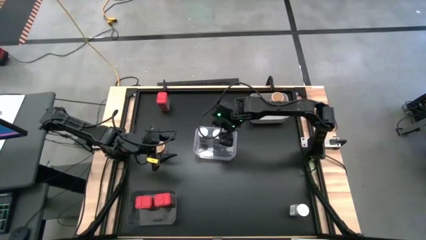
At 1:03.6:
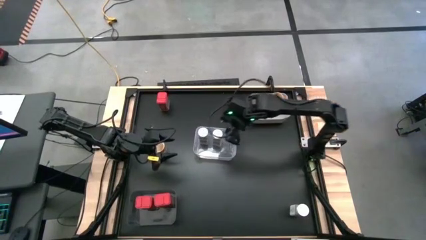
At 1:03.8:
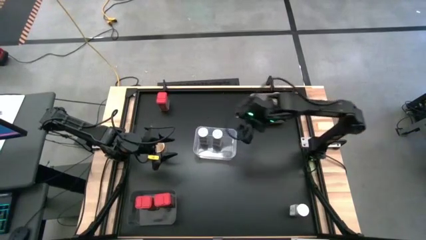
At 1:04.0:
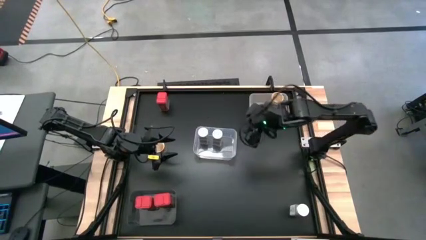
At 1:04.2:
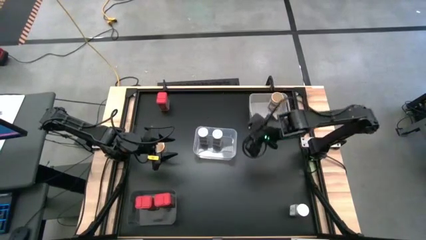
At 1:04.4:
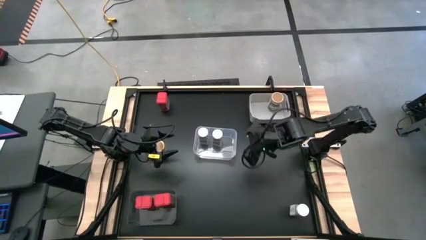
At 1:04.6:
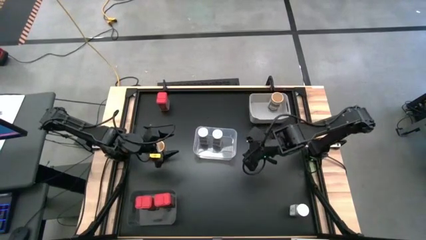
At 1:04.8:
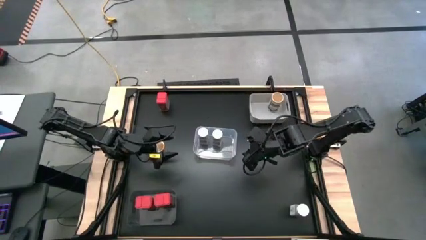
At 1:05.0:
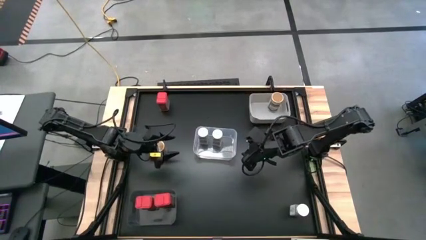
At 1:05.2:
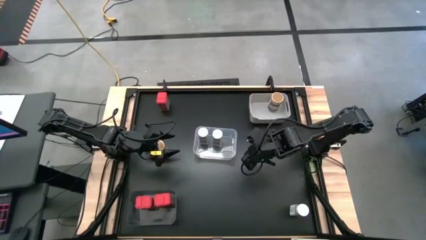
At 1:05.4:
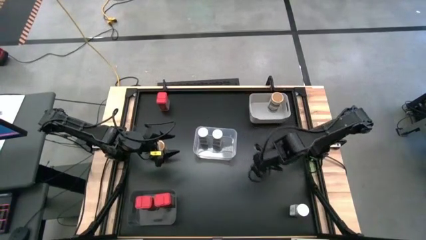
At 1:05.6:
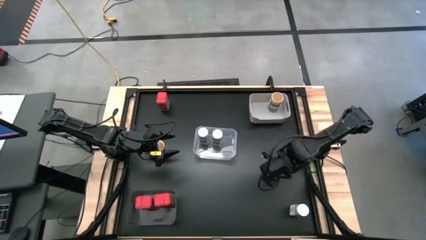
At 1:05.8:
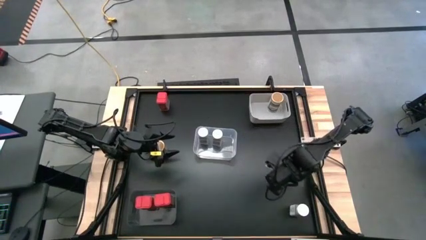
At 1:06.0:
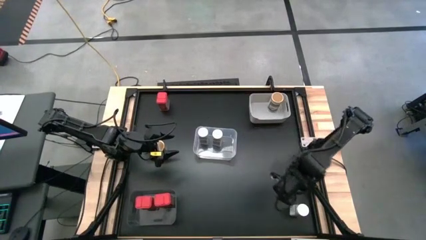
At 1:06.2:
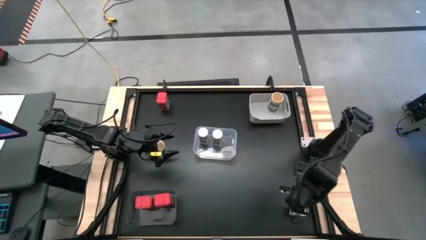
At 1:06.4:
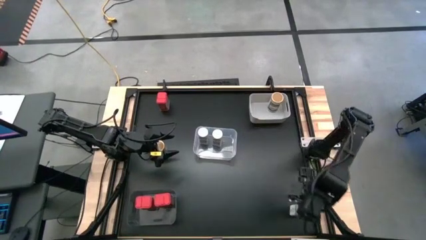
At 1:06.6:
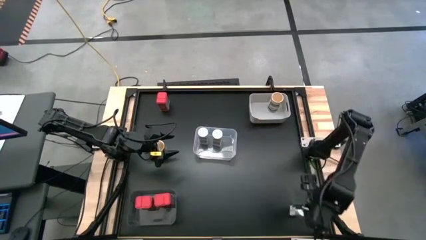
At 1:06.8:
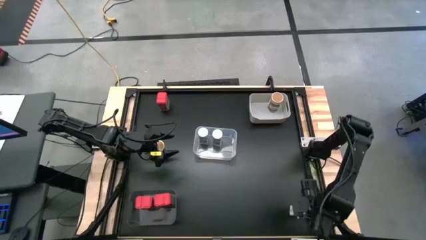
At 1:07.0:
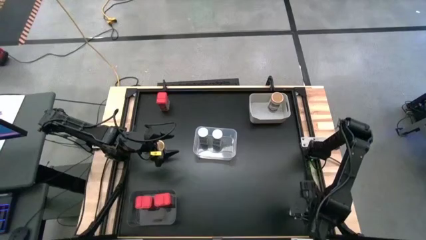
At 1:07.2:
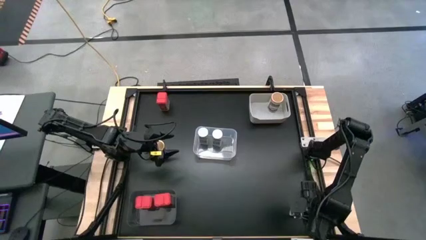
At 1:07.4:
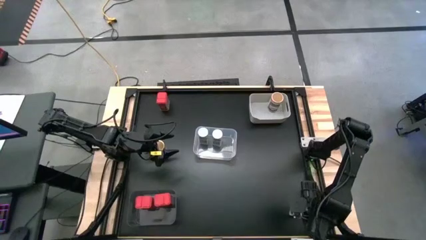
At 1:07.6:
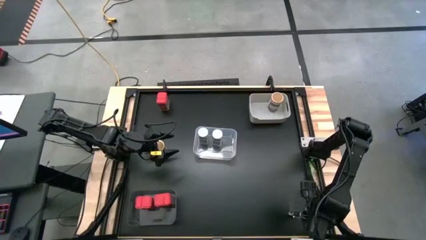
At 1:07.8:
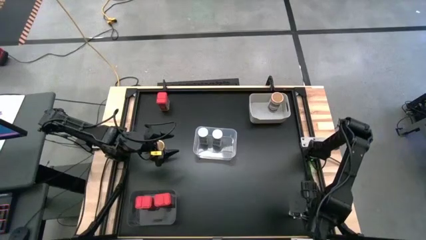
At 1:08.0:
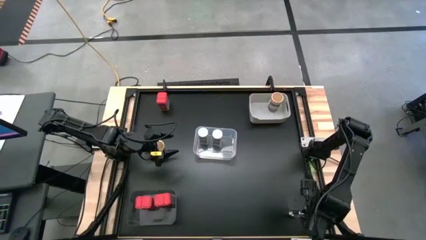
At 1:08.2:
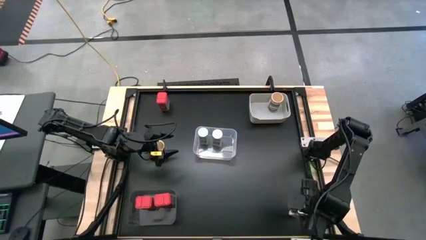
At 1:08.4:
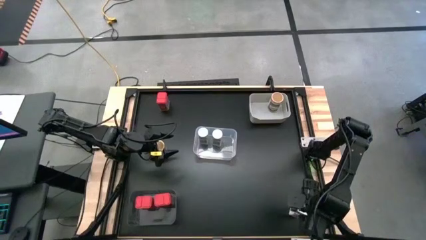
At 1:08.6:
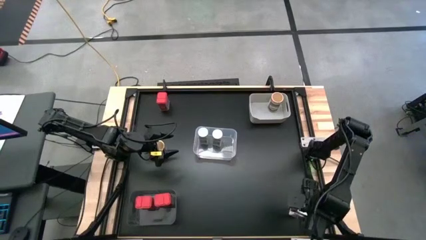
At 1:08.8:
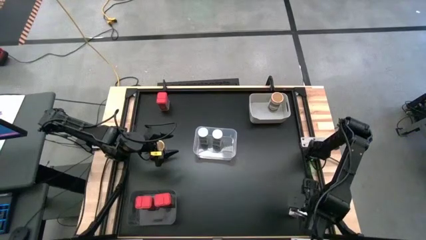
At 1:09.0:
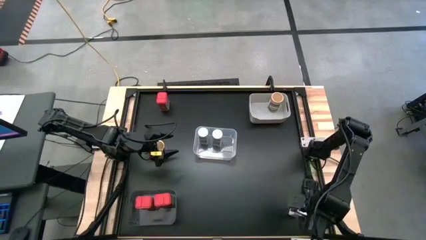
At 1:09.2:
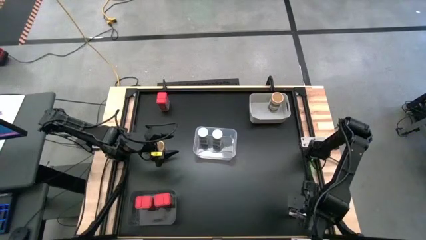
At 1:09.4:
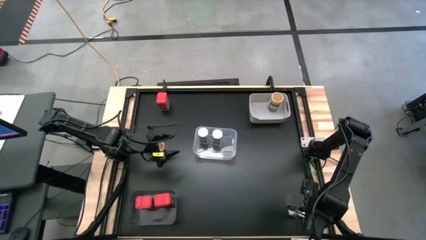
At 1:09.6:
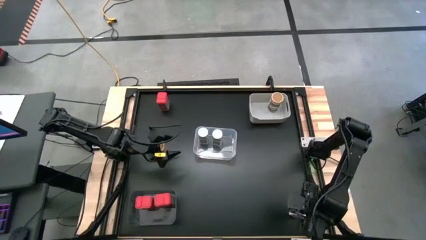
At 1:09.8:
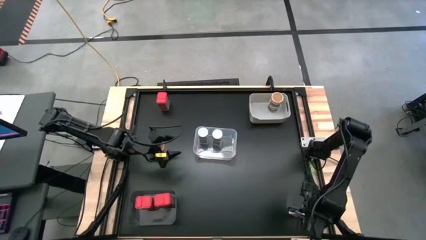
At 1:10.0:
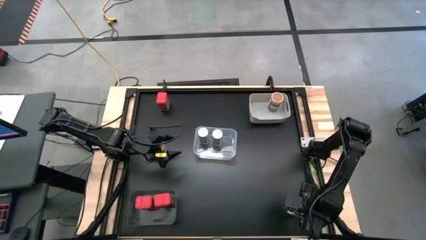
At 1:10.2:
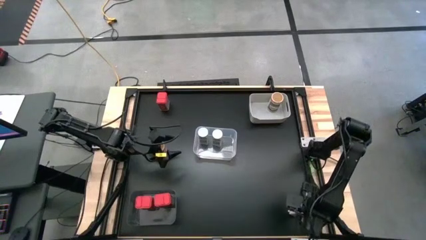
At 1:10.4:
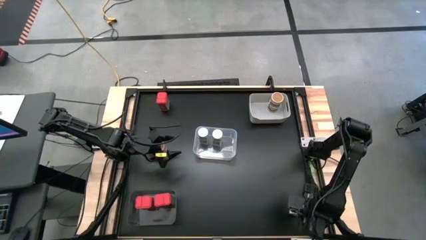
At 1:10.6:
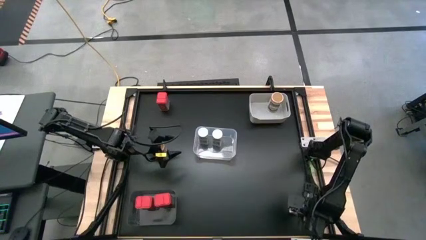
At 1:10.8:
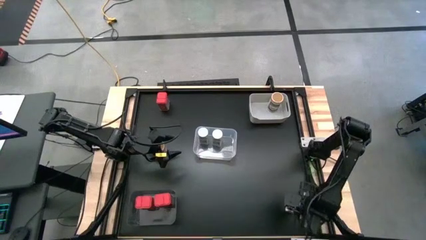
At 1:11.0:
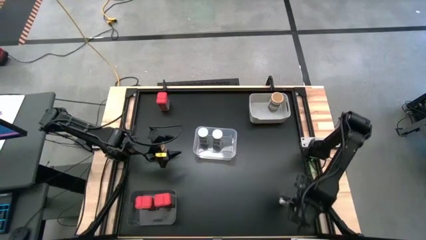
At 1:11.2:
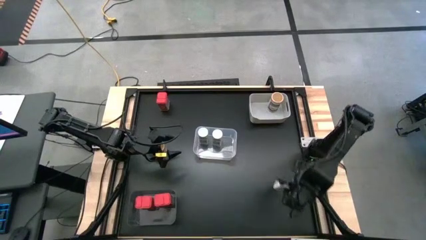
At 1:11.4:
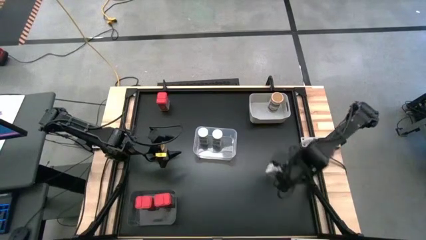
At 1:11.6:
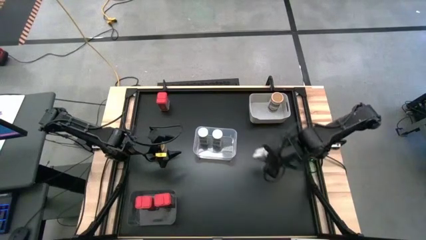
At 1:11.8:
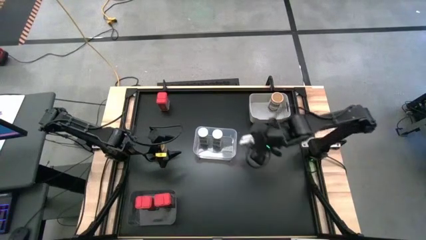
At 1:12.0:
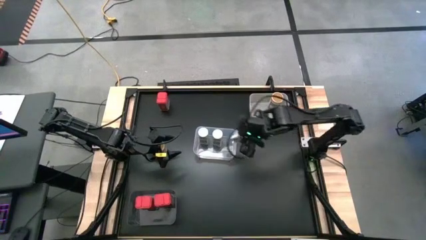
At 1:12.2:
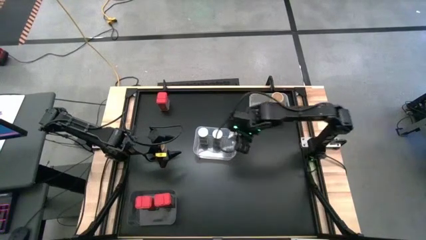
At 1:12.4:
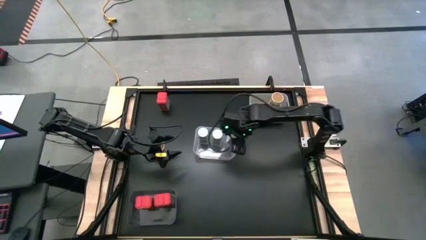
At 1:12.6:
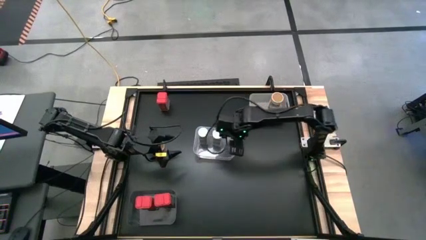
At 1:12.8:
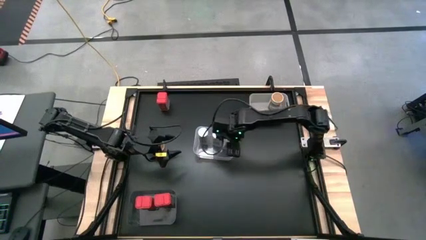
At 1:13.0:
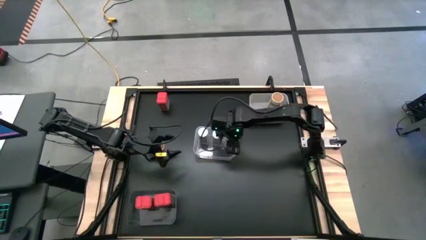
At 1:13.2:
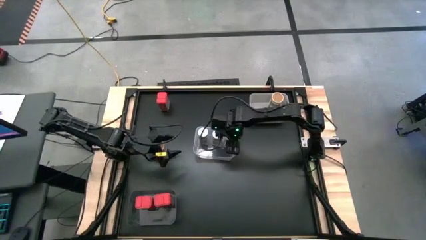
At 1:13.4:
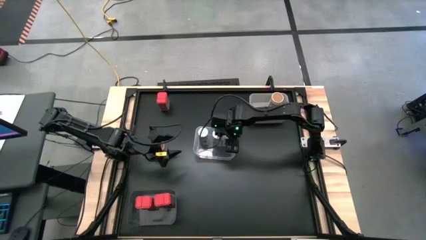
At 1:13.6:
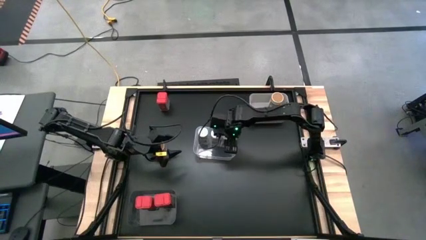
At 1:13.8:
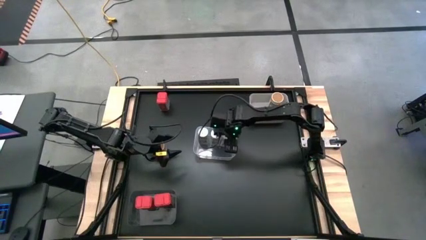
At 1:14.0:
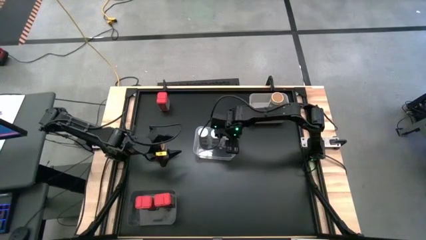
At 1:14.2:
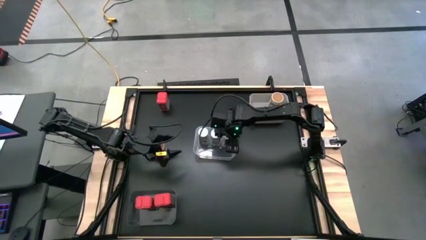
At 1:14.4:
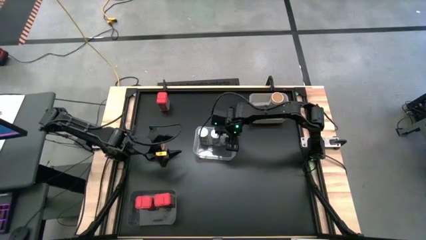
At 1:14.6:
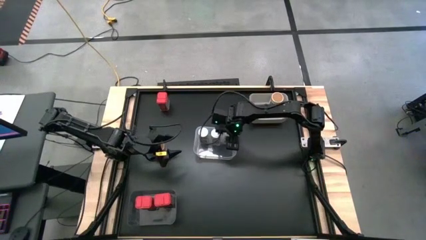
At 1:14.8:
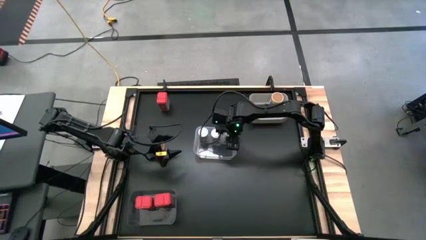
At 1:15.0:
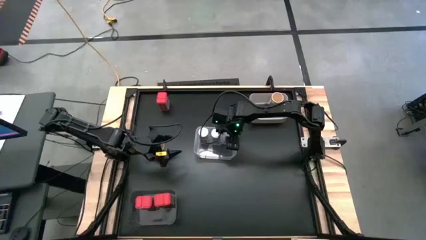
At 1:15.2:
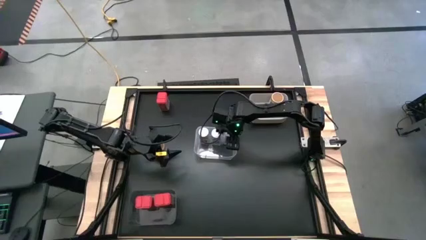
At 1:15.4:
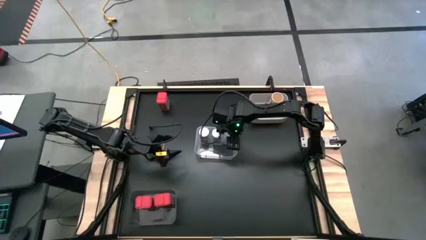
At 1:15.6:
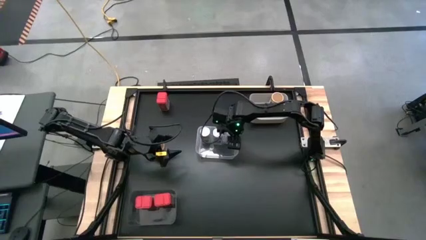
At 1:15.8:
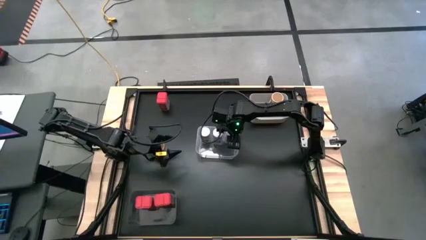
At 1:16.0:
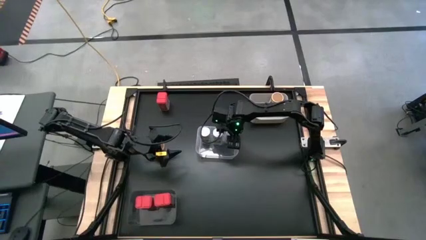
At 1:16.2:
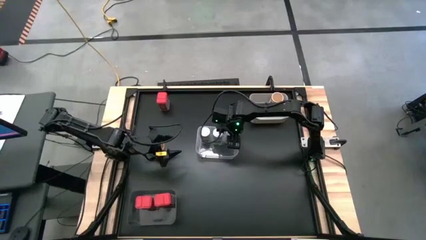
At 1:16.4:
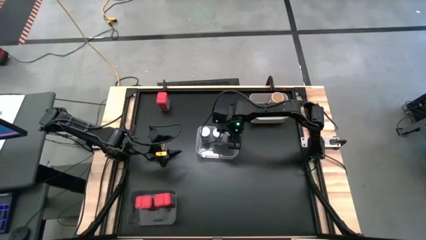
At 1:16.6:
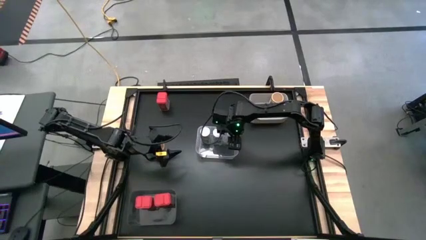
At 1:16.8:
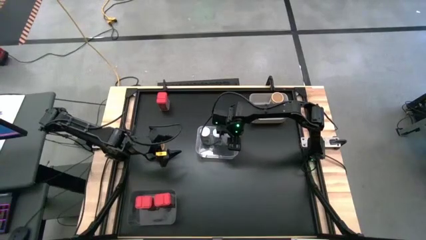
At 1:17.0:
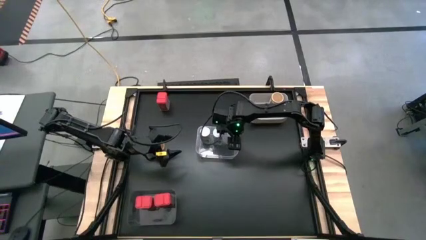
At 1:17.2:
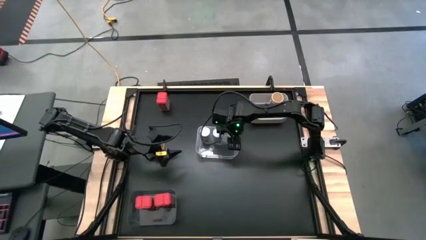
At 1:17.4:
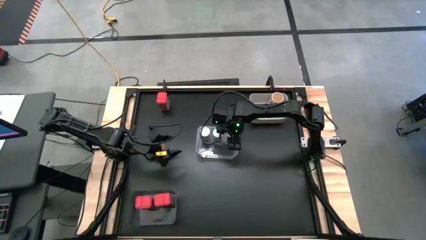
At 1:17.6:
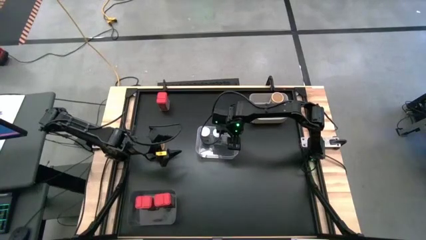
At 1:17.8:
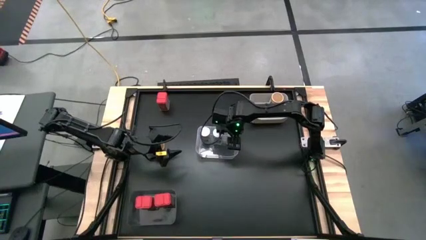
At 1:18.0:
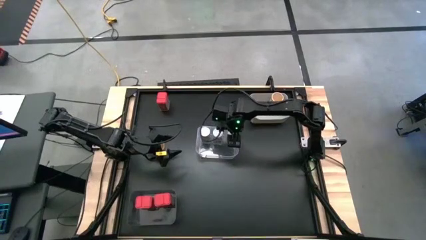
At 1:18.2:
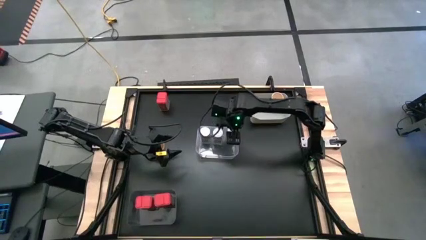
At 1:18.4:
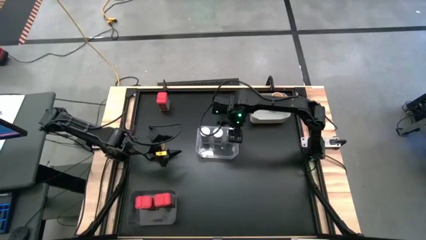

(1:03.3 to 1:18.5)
Task: Sort spices by type
Put the white seasoning bottle into the transparent bin
